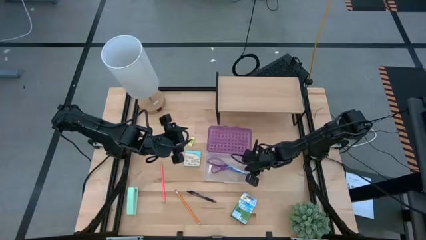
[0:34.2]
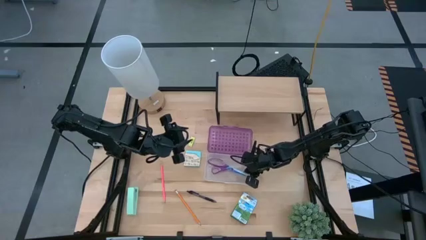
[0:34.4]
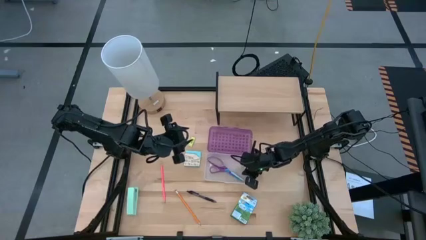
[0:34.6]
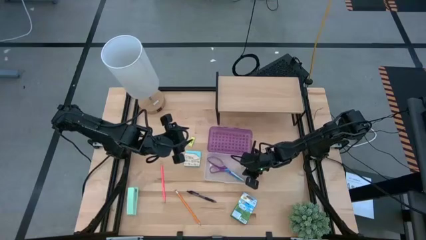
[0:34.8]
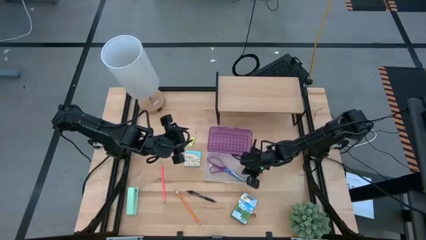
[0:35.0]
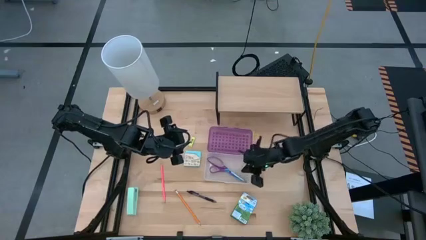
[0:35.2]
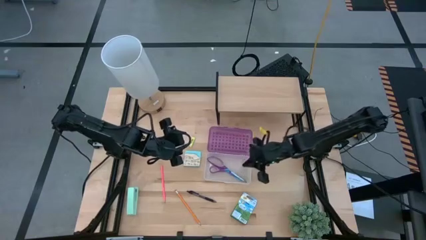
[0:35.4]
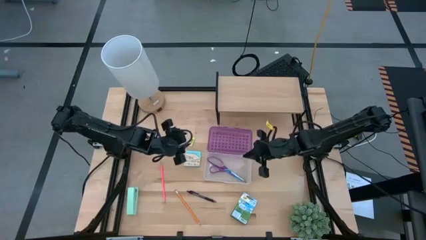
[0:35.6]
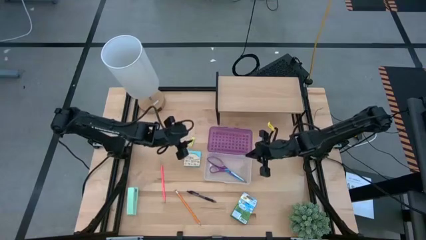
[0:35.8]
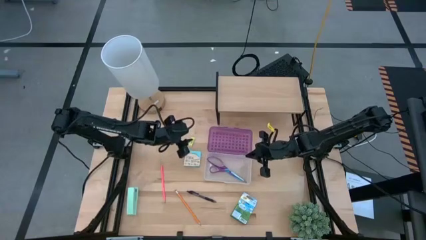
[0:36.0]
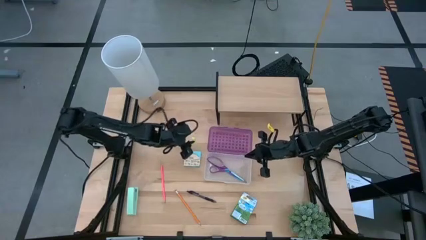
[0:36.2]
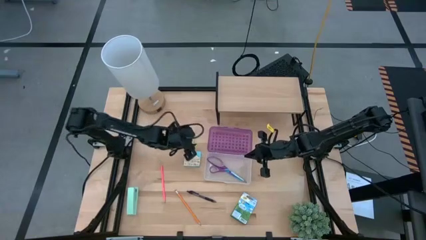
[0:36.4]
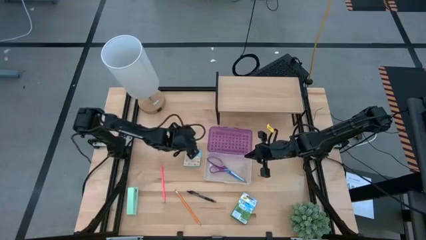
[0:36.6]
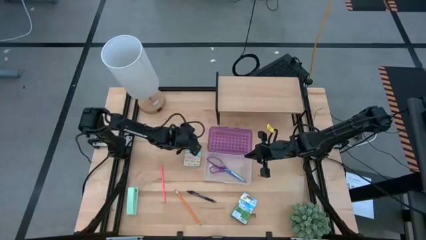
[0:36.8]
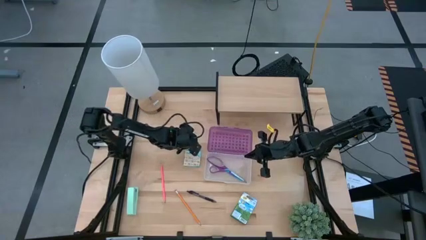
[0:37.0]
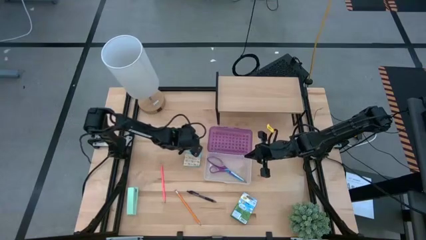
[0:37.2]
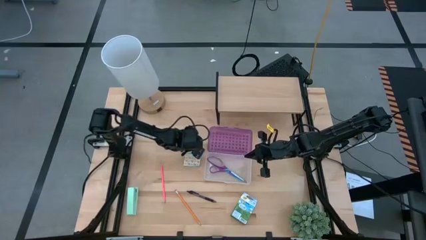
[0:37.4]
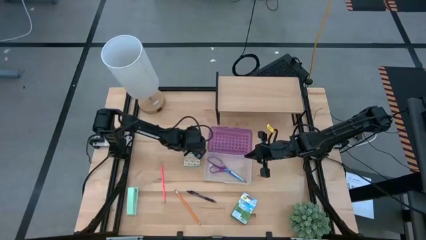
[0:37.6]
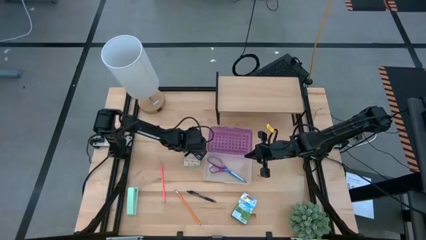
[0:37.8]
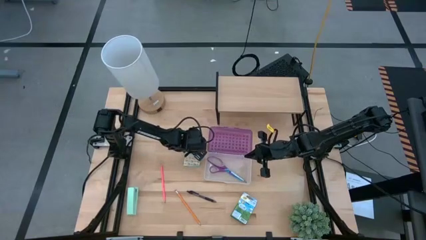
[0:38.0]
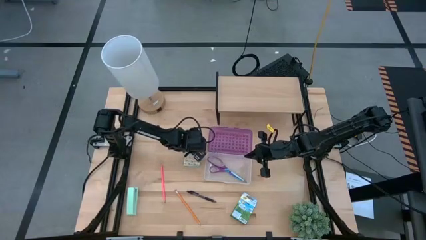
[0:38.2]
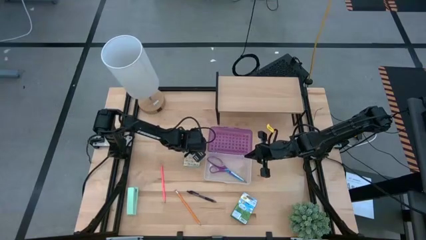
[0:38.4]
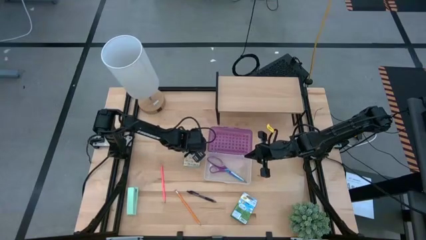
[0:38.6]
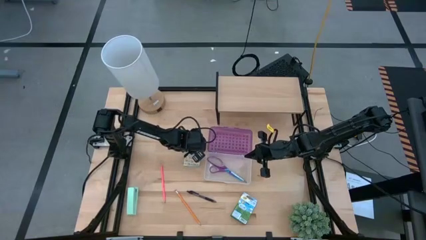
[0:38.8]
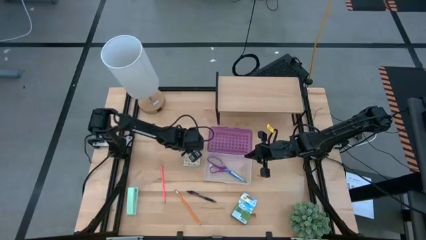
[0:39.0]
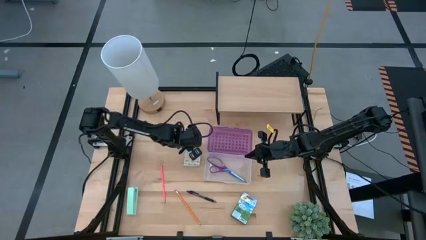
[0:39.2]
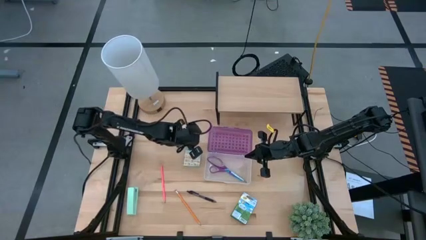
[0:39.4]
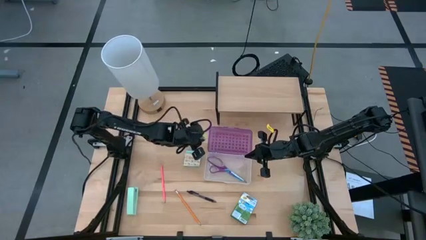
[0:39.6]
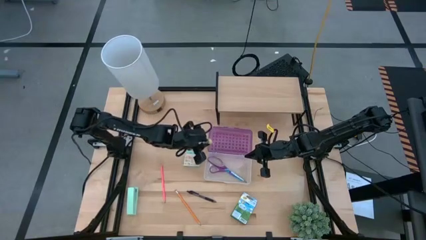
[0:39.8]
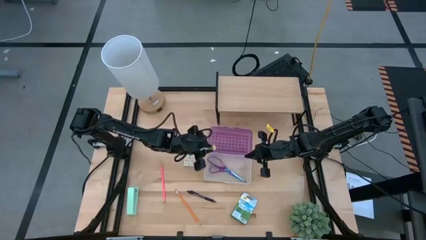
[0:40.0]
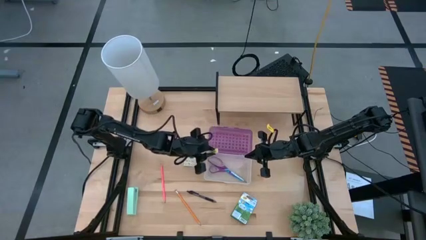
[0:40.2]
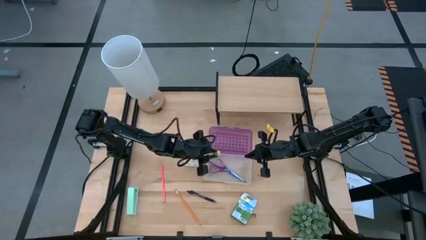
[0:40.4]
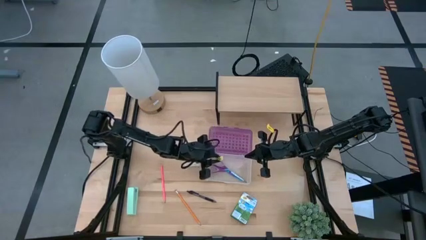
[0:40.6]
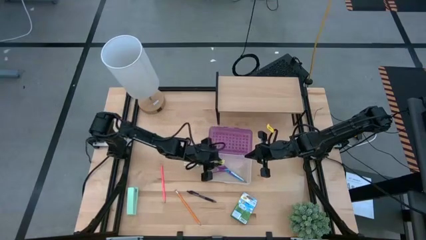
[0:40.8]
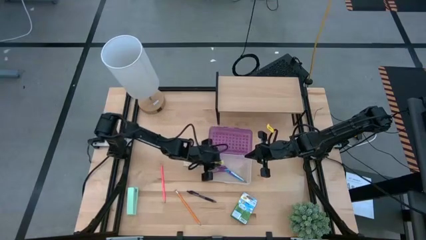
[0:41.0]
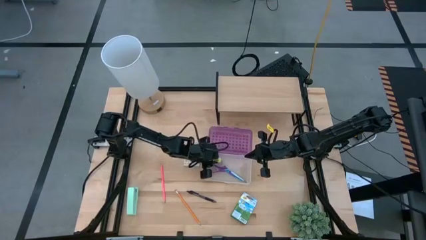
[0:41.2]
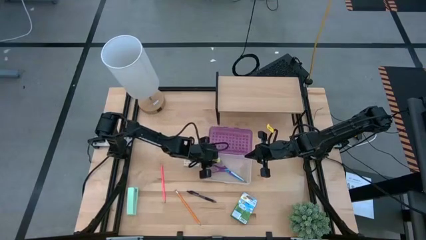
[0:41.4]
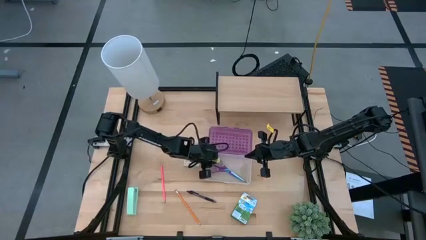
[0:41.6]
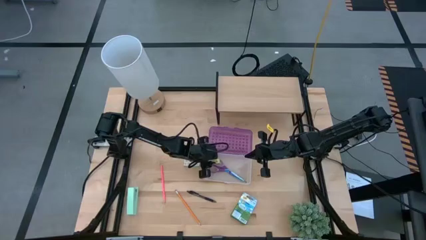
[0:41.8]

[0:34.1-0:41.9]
Task: Pack school essentials
Put the yellow eraser into the purple supply box

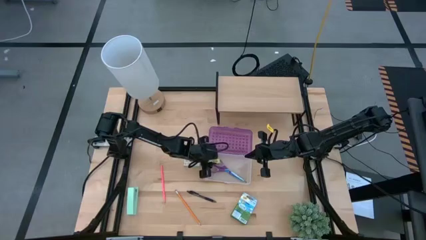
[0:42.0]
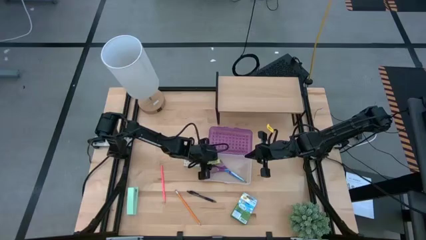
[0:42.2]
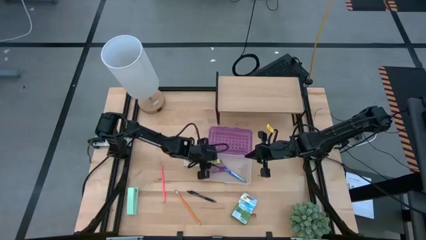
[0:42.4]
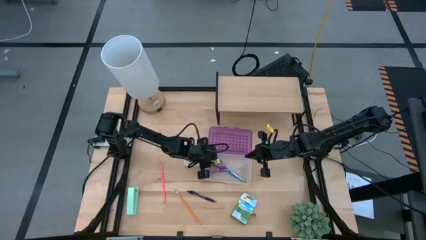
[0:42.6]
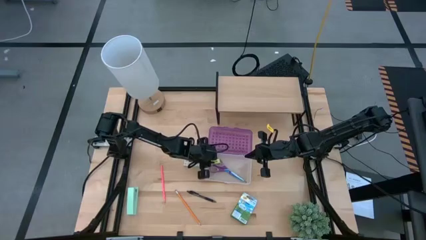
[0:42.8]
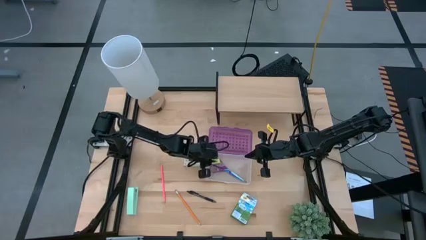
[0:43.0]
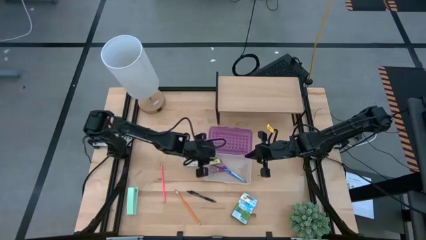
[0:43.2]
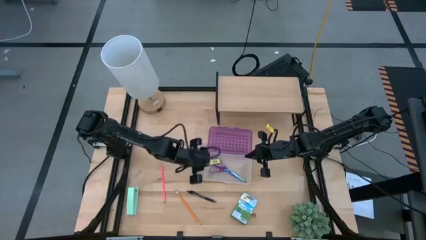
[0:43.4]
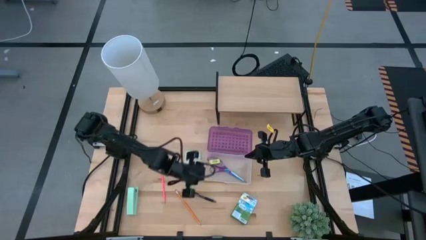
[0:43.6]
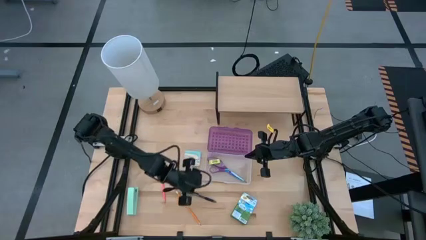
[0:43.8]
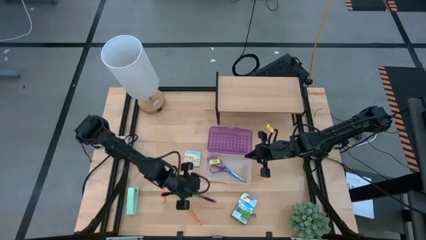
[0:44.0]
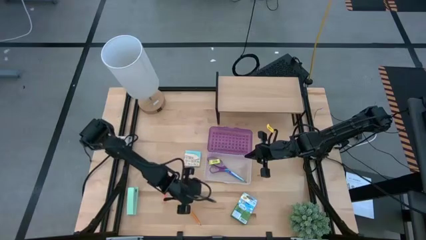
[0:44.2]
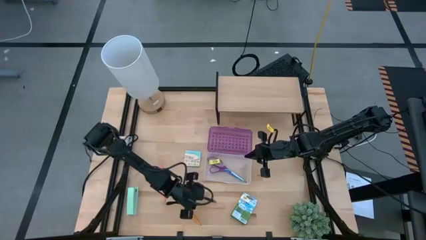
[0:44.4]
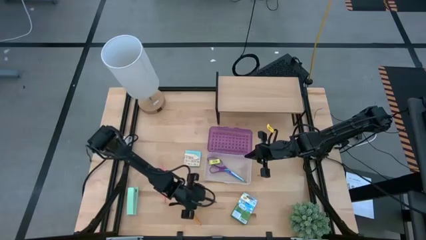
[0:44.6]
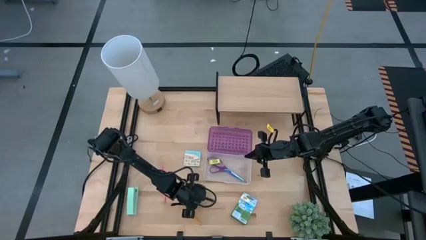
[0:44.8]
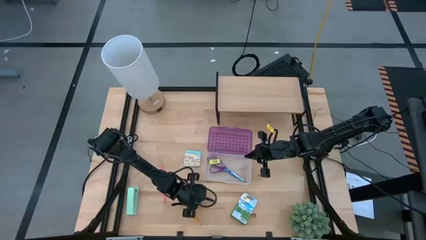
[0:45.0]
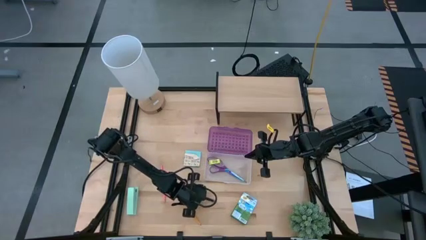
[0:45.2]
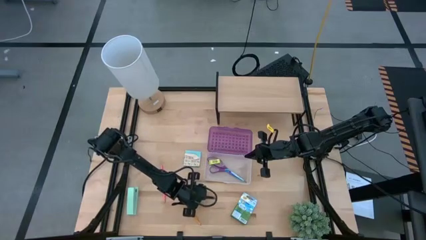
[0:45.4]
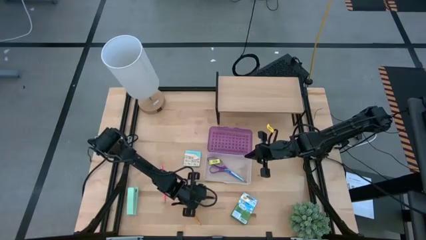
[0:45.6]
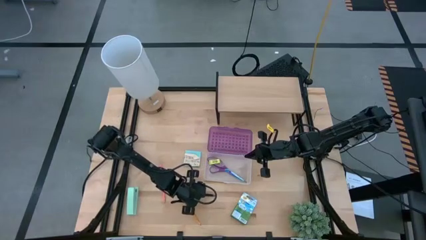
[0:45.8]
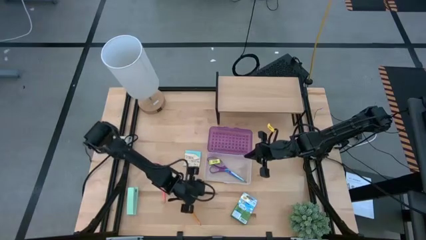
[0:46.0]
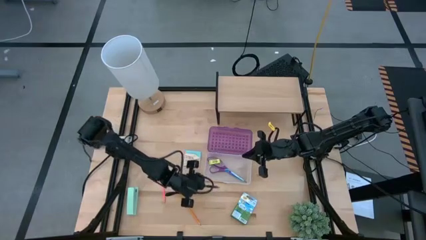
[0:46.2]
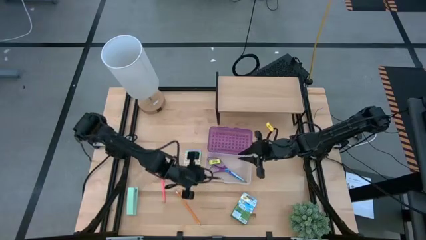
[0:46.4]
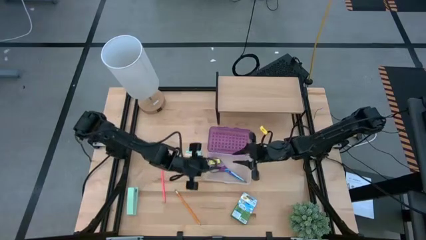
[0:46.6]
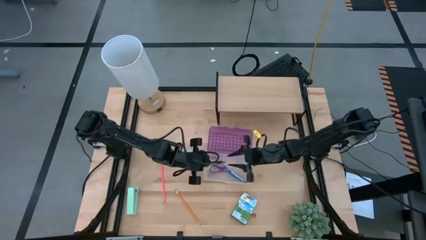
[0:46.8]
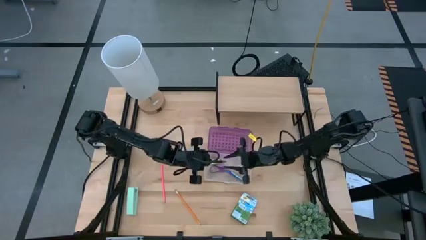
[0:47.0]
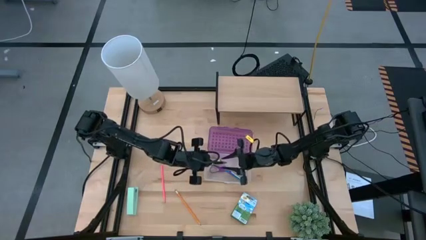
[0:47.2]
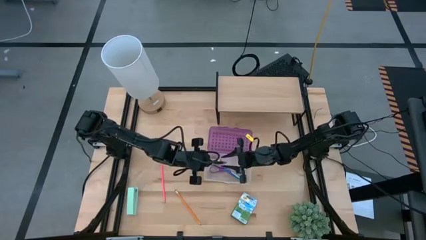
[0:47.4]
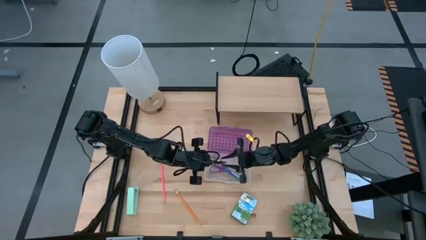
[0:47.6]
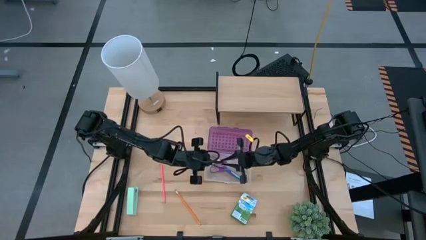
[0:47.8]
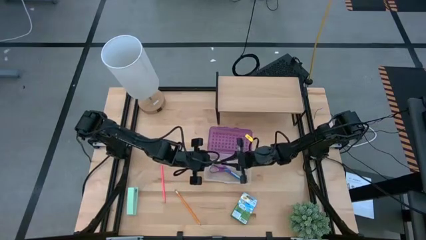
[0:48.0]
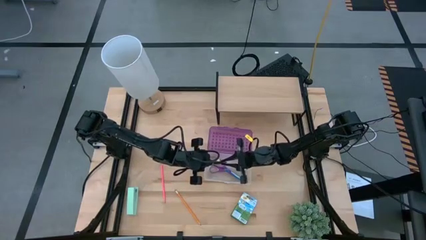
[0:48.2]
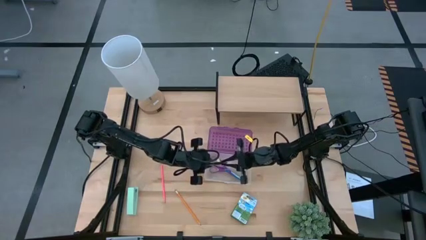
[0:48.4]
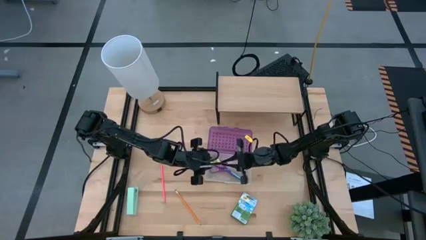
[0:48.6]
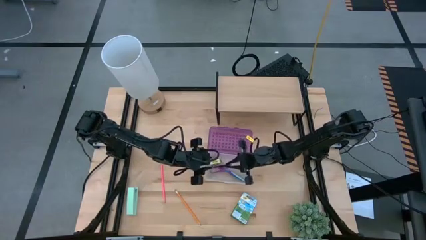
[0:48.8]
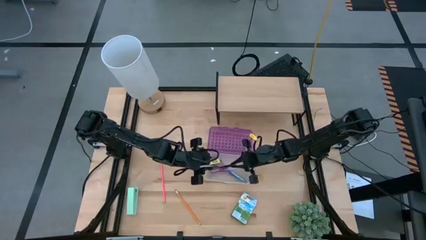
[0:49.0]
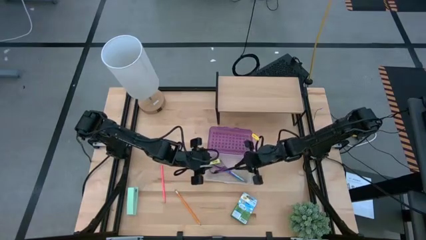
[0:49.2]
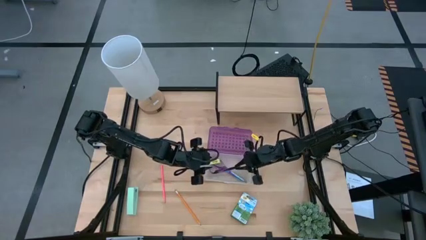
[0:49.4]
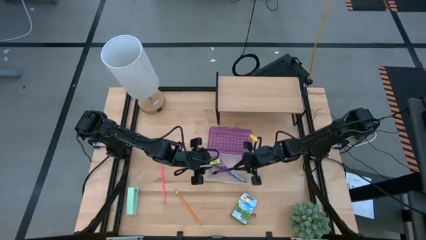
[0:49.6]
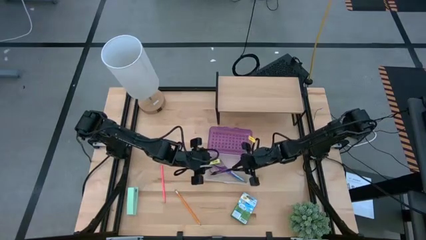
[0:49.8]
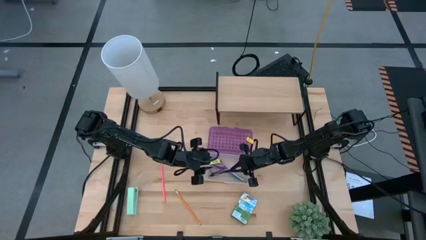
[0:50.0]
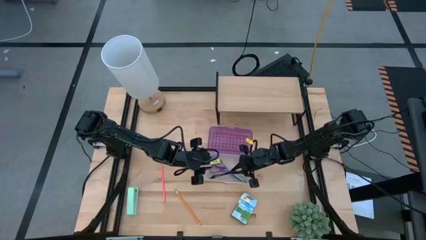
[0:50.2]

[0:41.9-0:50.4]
Put the black pen into the purple supply box

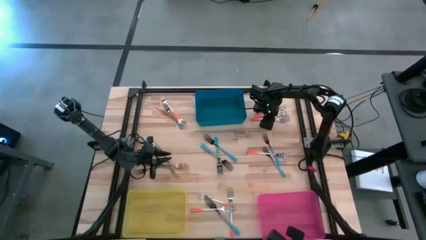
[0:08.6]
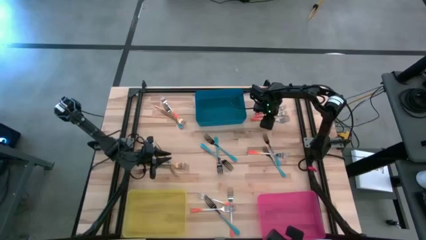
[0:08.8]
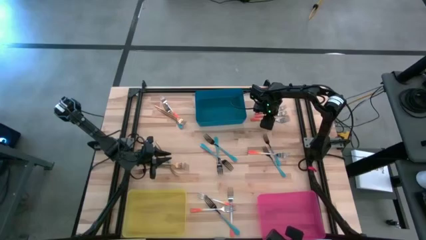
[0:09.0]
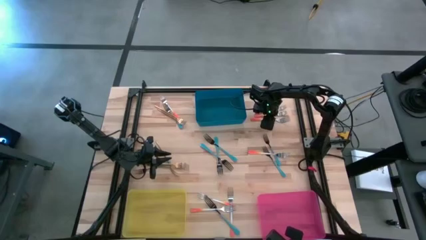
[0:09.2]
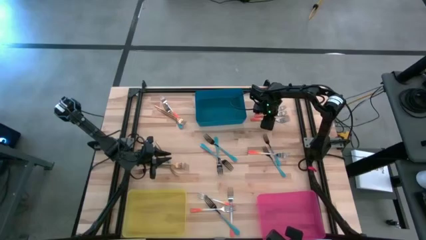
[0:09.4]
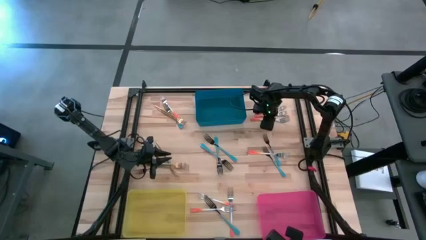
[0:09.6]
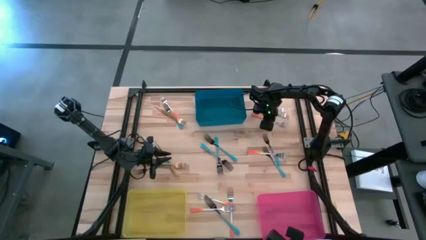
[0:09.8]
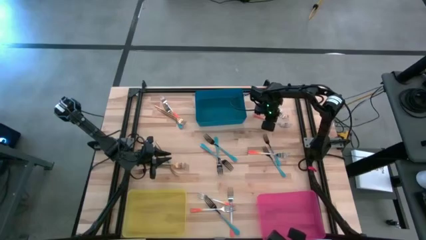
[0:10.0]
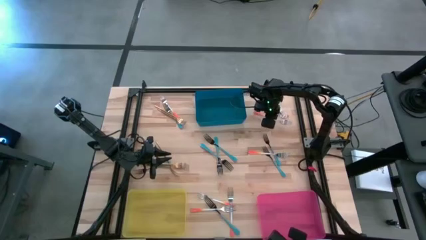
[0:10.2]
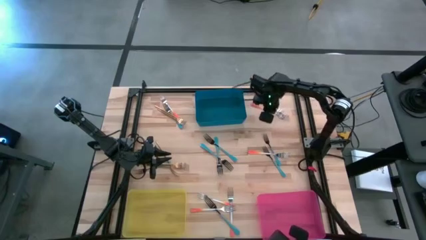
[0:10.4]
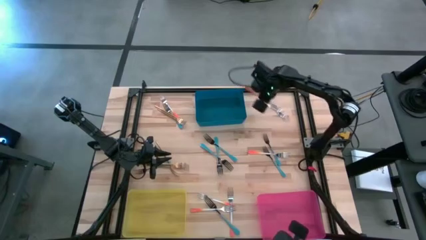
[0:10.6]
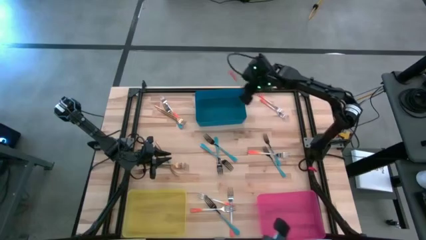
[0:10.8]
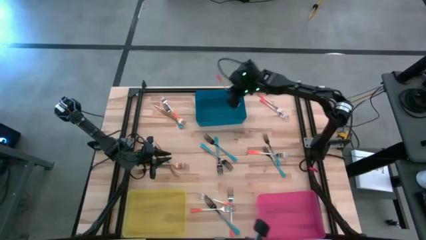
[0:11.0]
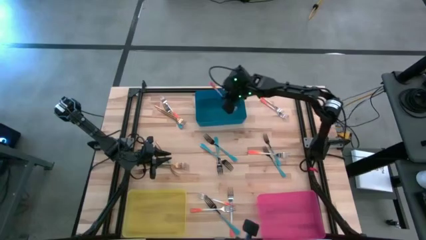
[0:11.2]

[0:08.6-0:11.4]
Task: Sort silverware by color (type)
Put the orange fork into the blue bin
